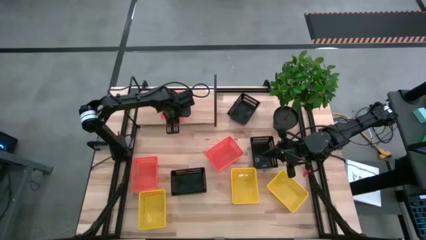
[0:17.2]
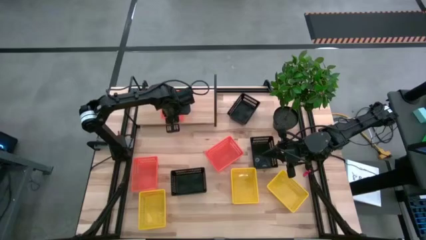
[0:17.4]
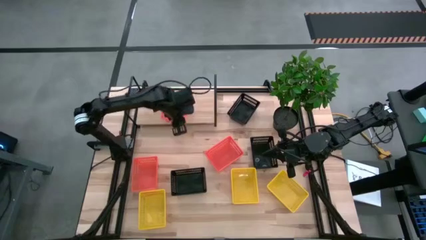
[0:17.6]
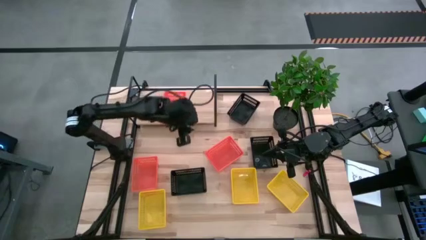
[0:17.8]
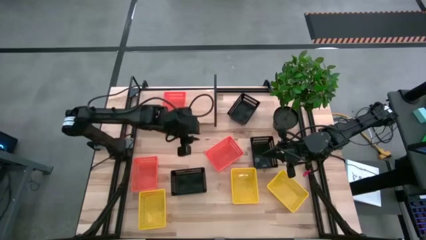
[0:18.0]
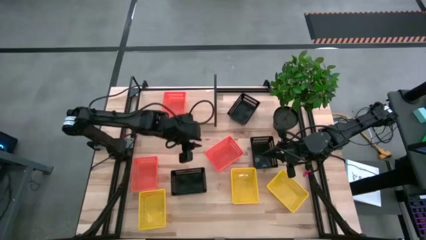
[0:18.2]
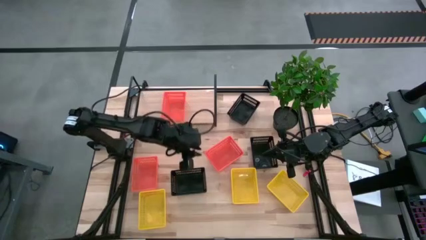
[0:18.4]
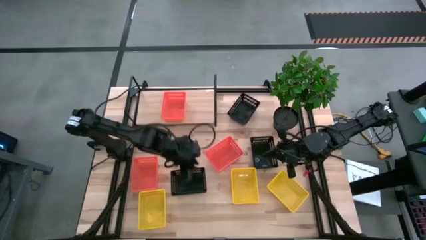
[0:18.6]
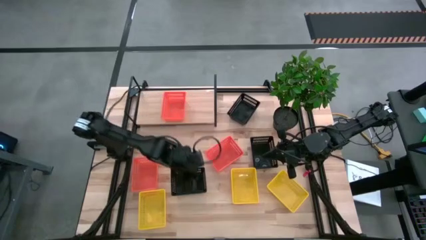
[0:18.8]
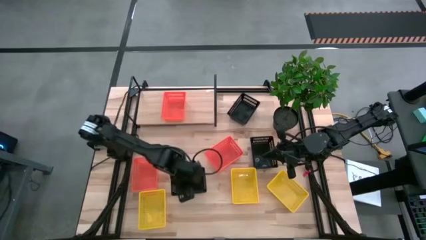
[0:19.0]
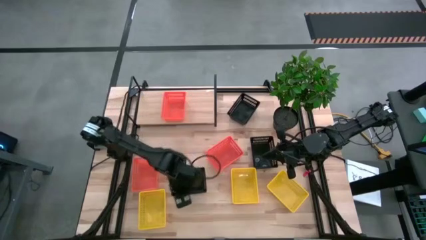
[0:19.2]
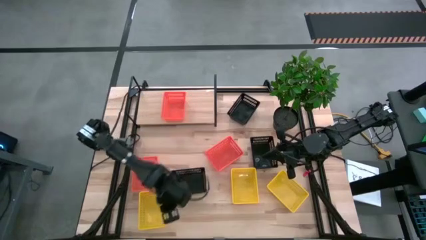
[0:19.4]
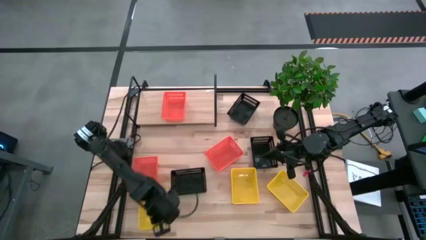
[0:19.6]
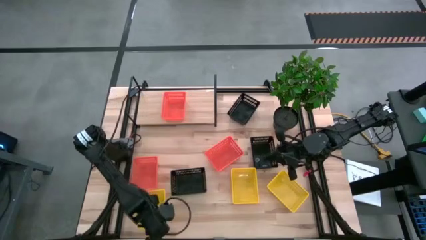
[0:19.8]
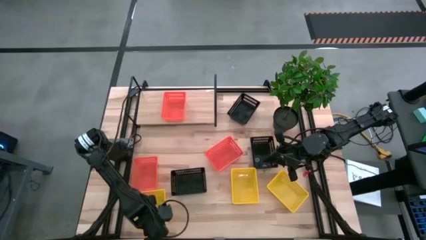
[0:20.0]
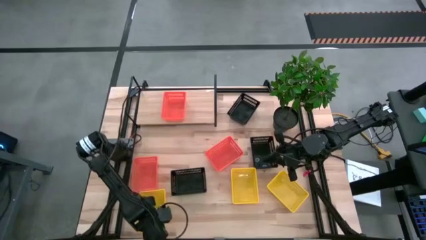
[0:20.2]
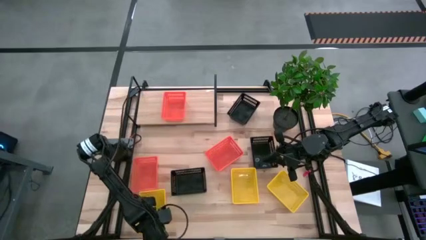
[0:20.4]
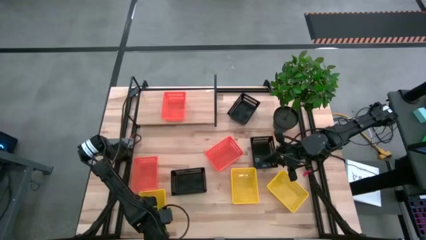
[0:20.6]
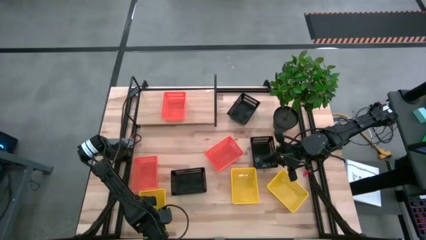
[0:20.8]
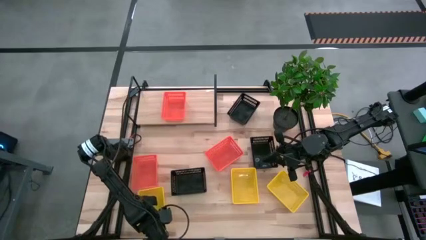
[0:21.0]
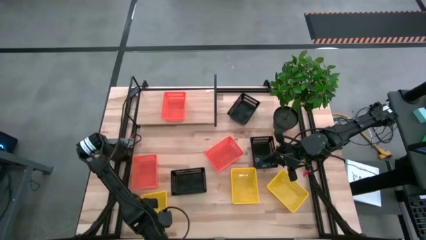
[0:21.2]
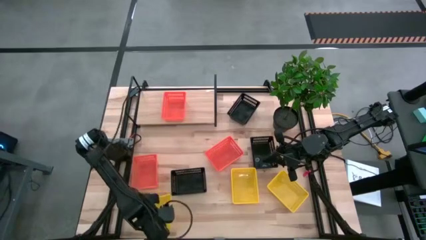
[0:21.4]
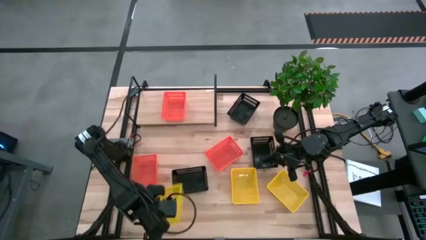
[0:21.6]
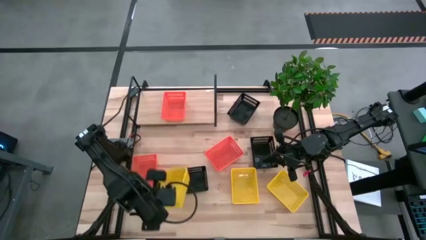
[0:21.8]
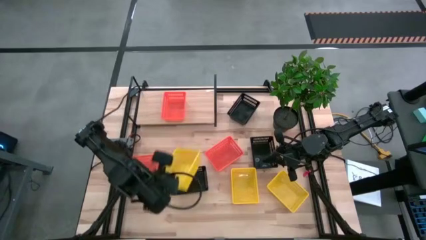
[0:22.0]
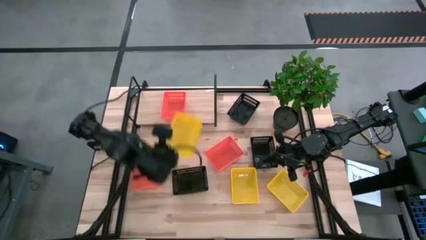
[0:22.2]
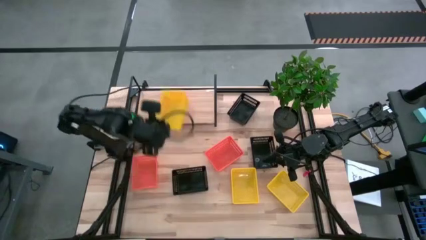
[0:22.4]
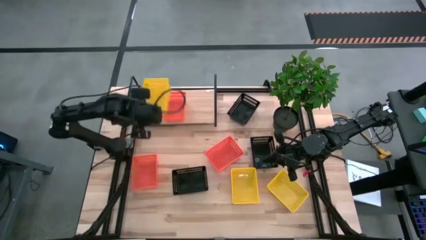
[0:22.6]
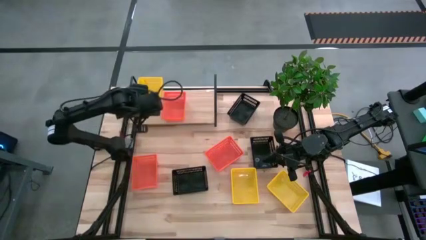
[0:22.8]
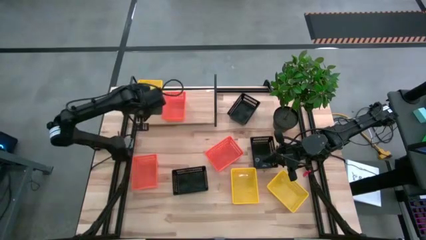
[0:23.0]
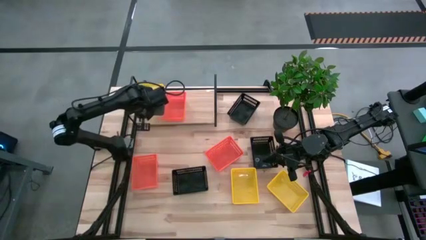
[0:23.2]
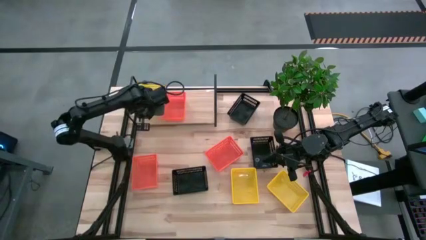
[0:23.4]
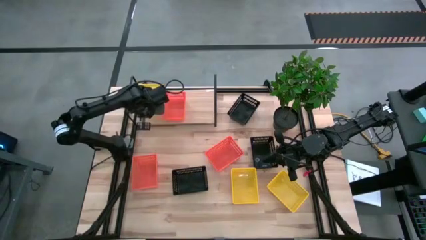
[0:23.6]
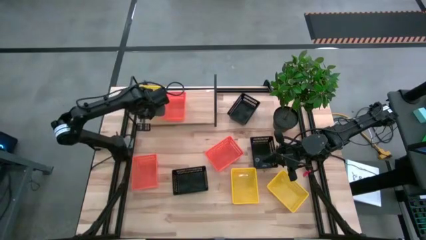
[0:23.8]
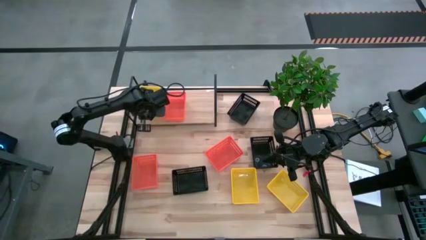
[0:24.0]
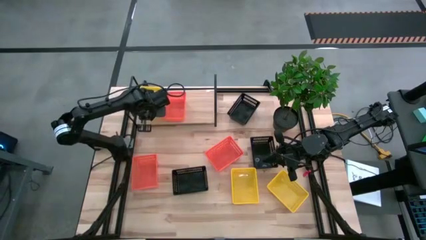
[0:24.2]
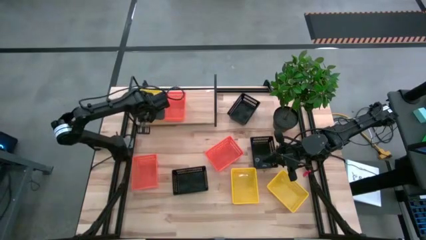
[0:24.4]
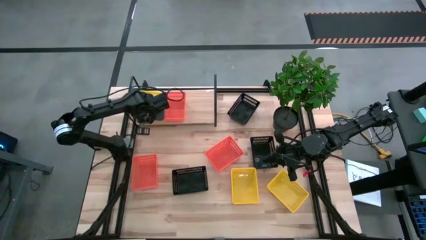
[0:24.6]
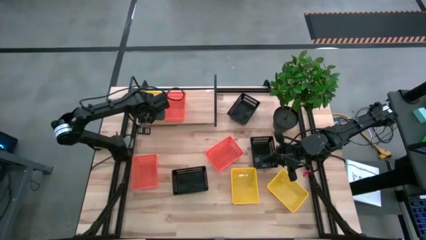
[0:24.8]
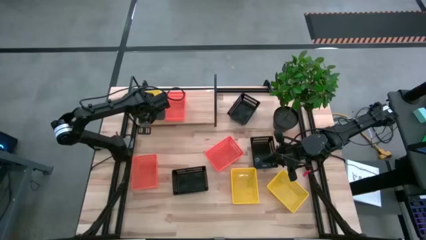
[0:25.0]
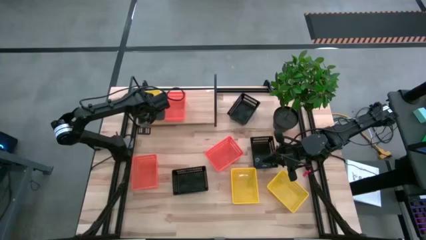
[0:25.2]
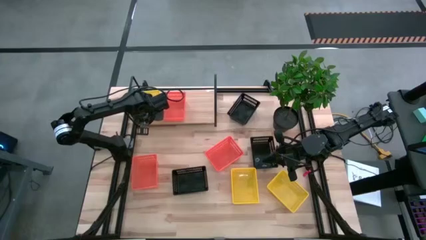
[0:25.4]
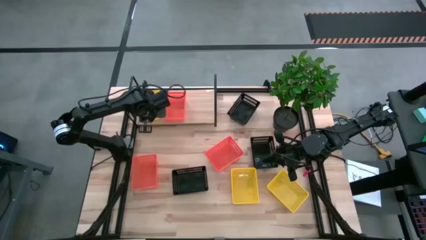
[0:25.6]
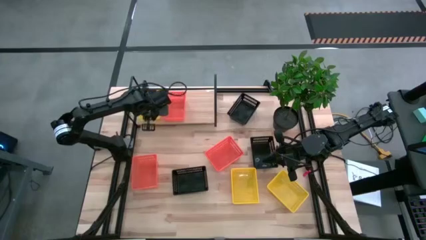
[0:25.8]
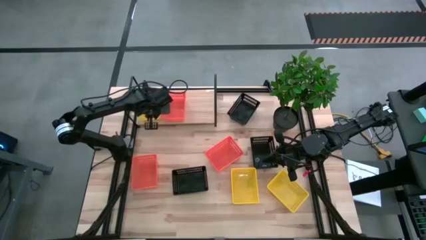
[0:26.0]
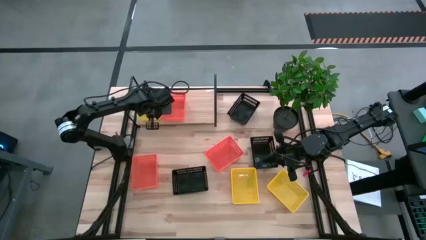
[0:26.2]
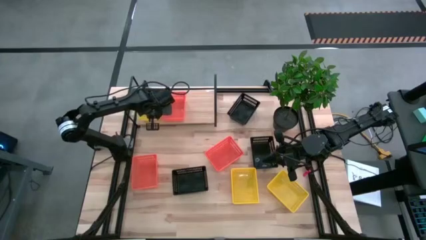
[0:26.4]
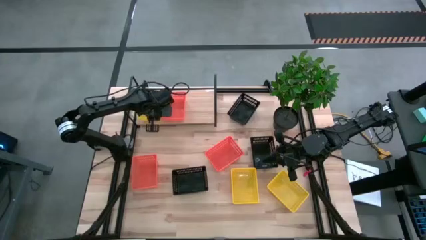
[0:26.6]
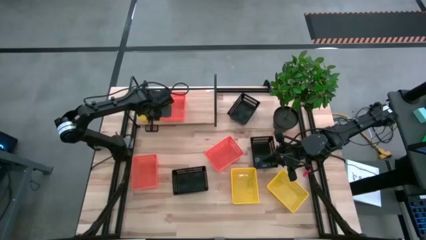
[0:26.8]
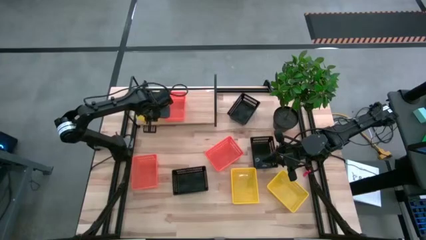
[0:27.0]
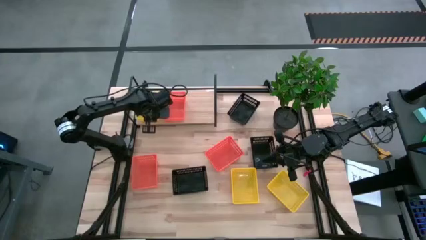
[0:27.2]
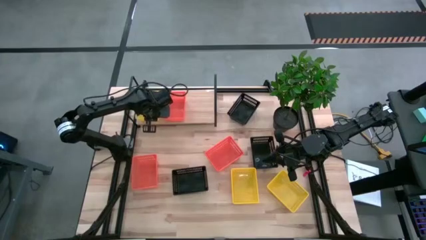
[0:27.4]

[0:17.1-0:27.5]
Task: Stack baskets on shelf by color
Put the left yellow bin on the shelf
